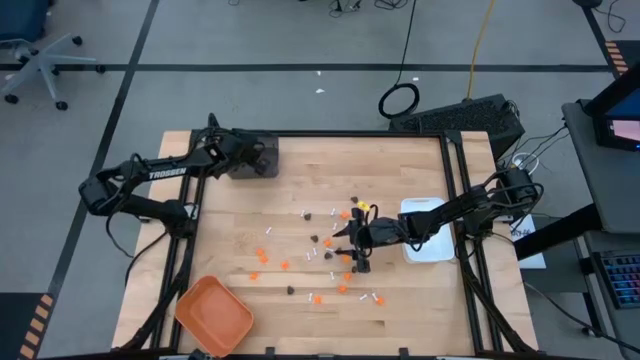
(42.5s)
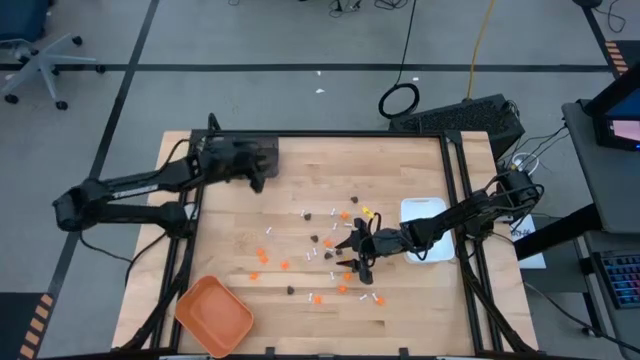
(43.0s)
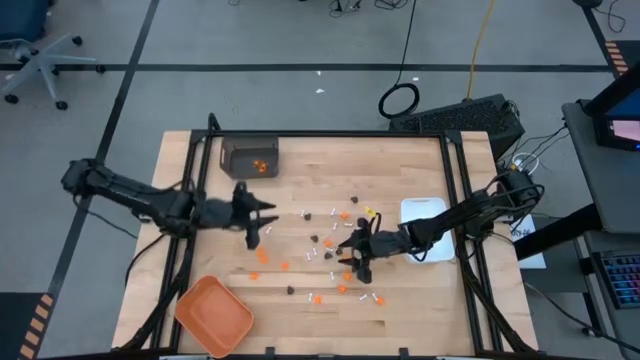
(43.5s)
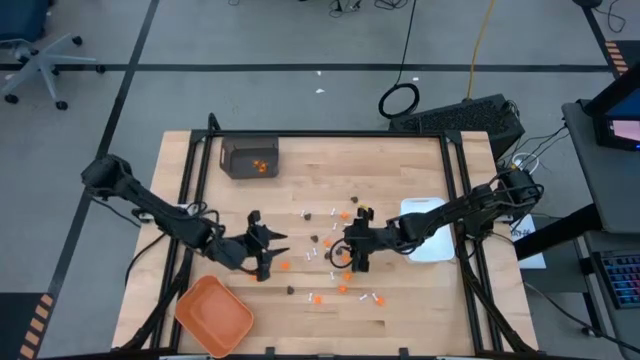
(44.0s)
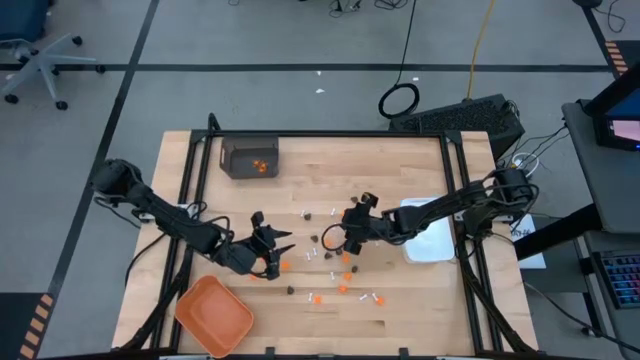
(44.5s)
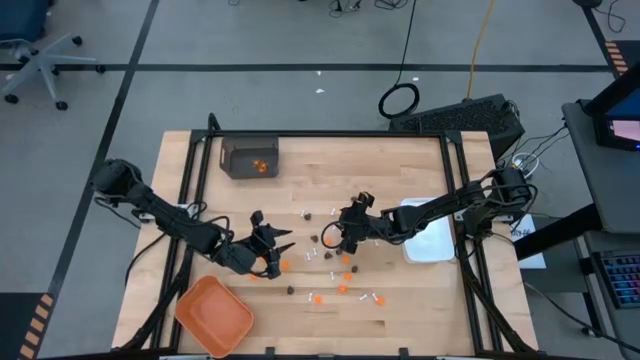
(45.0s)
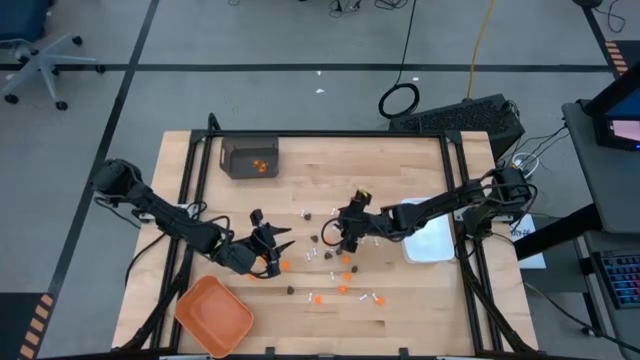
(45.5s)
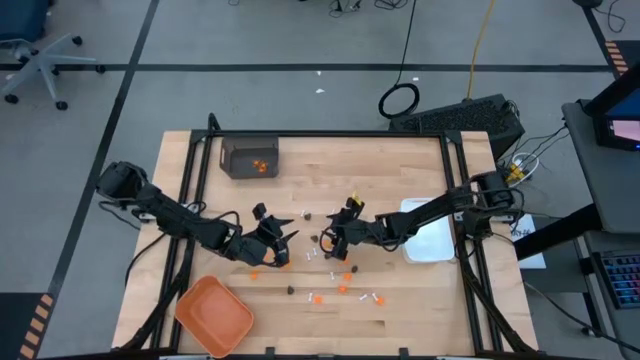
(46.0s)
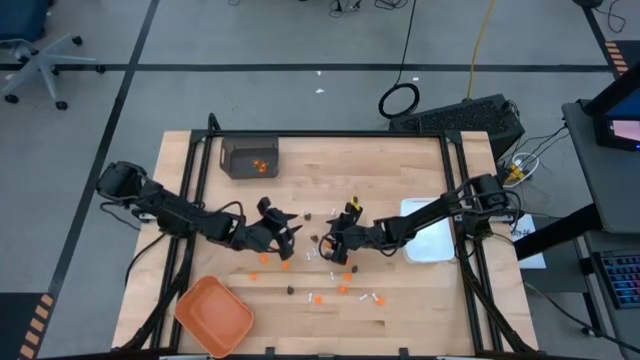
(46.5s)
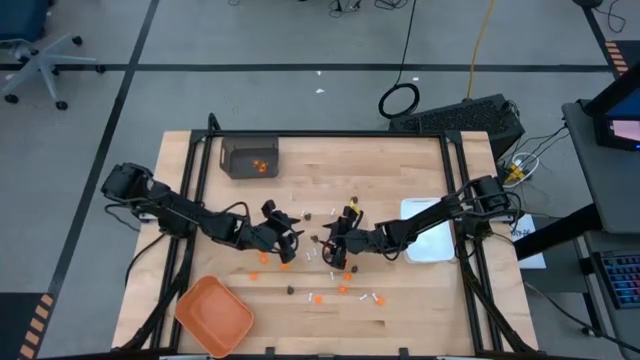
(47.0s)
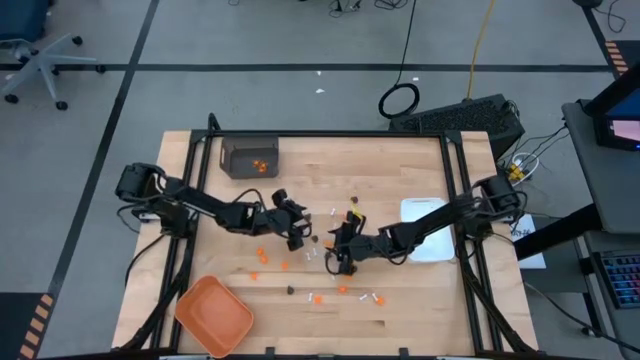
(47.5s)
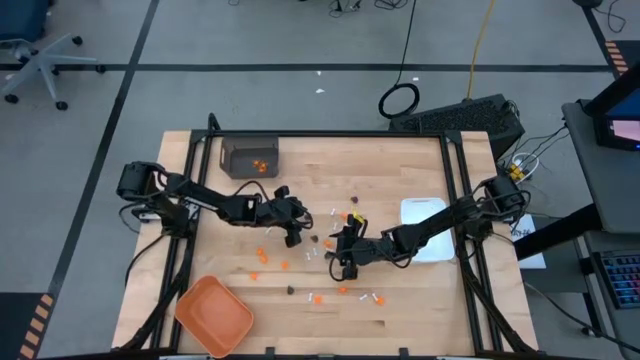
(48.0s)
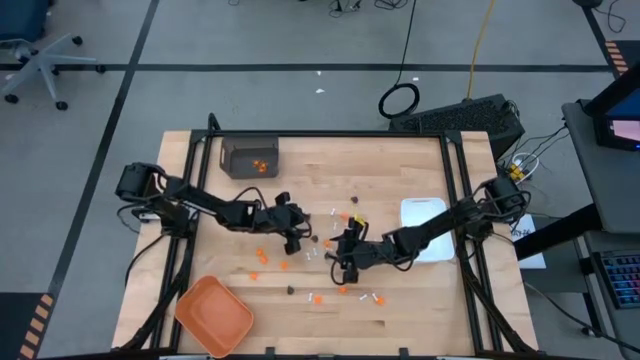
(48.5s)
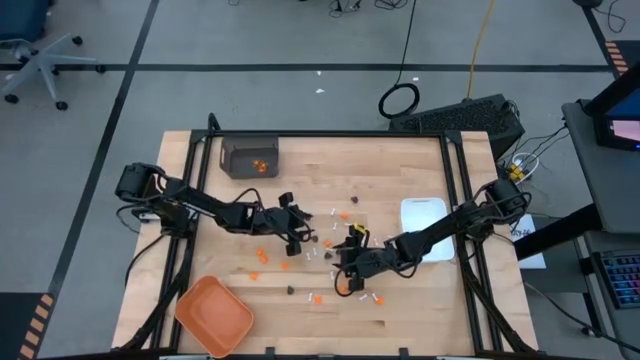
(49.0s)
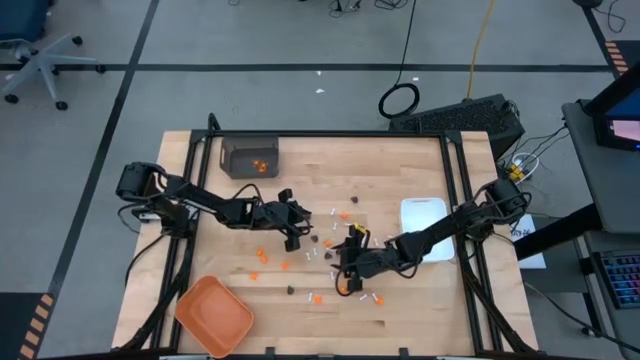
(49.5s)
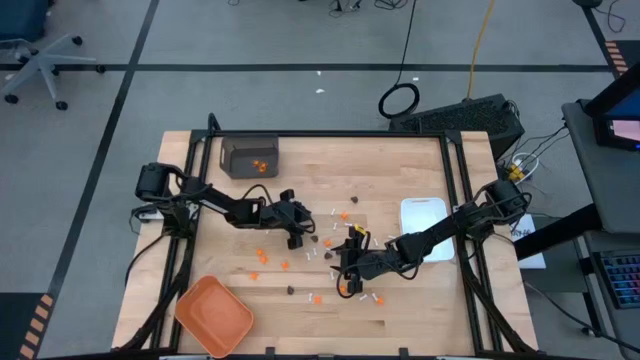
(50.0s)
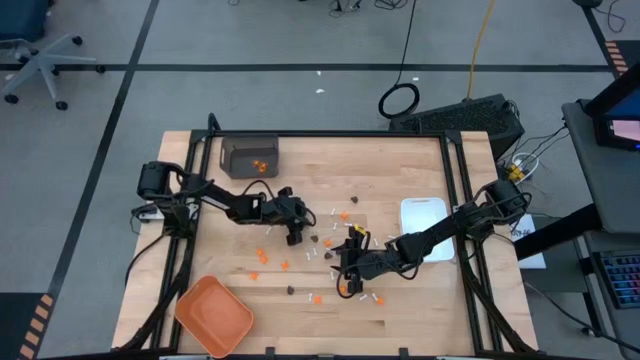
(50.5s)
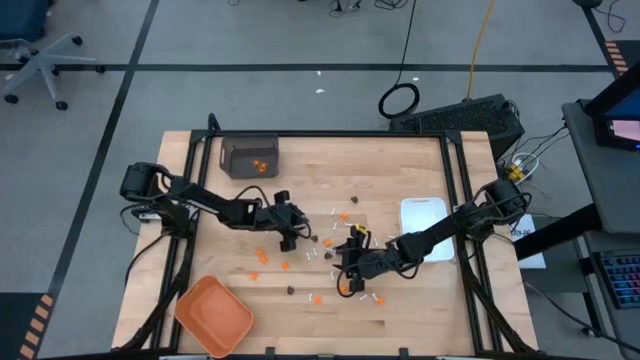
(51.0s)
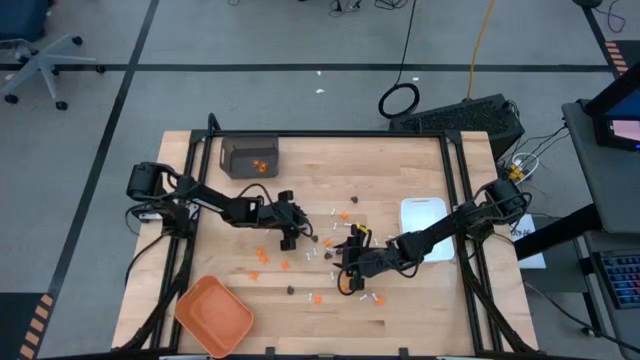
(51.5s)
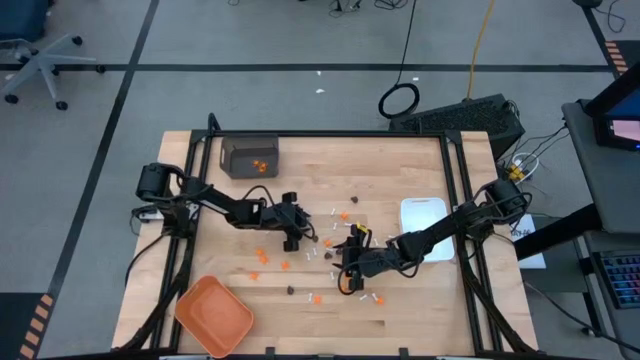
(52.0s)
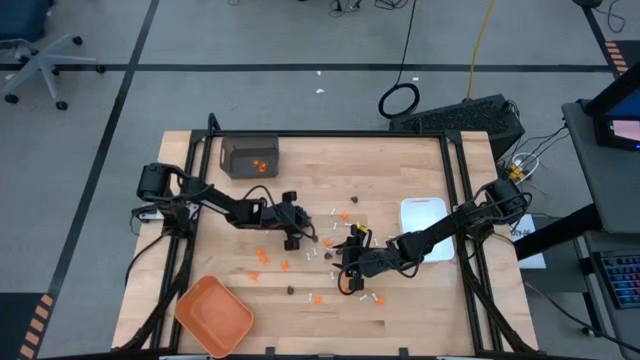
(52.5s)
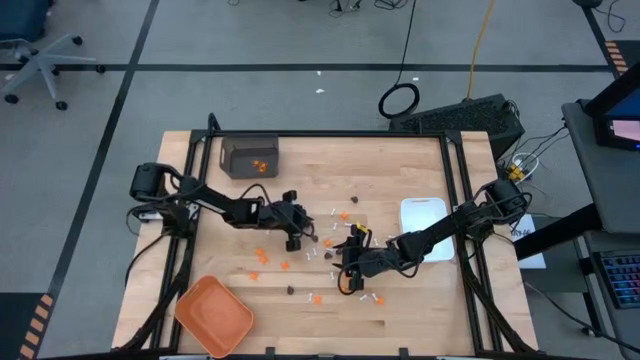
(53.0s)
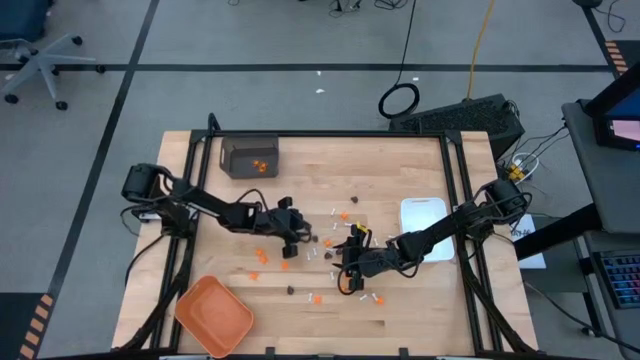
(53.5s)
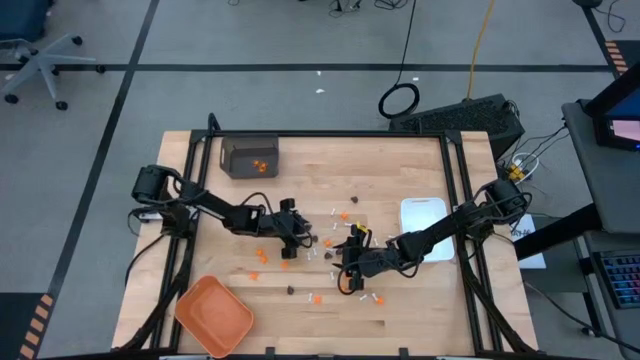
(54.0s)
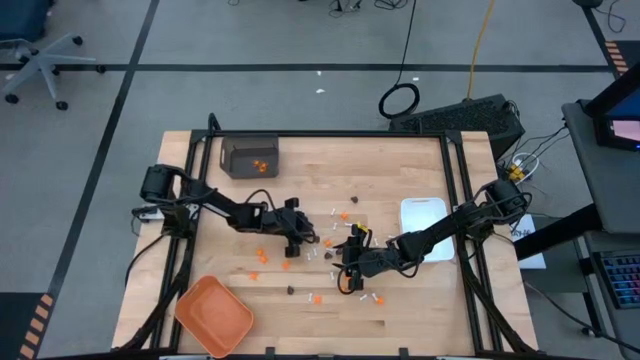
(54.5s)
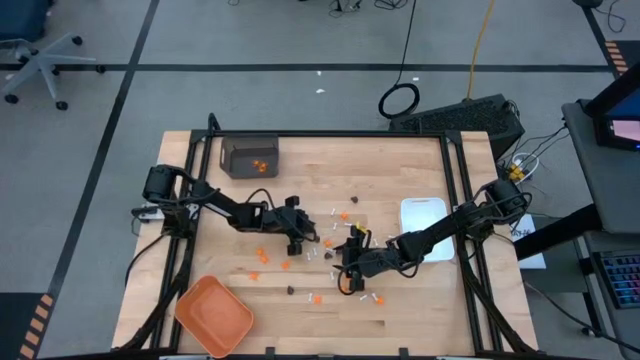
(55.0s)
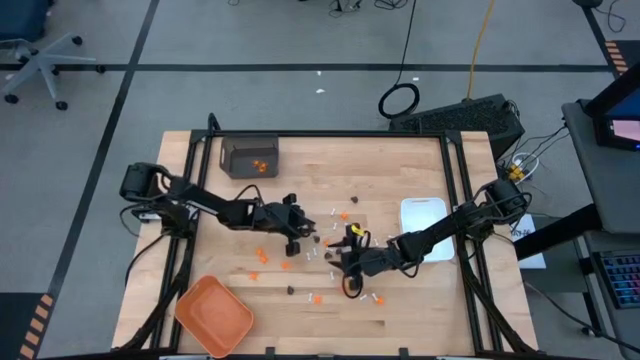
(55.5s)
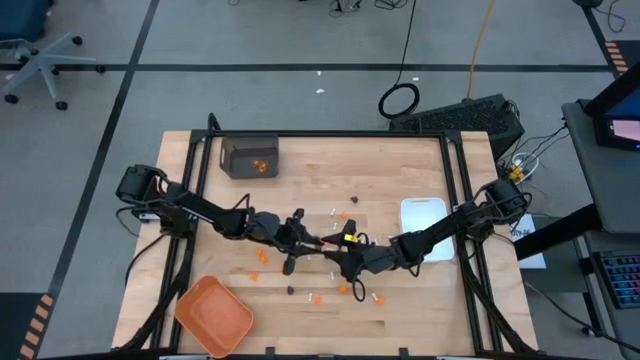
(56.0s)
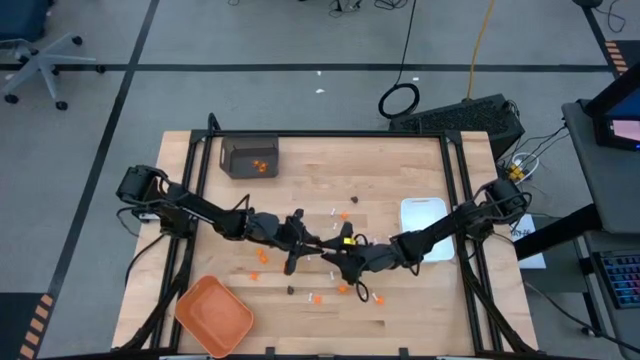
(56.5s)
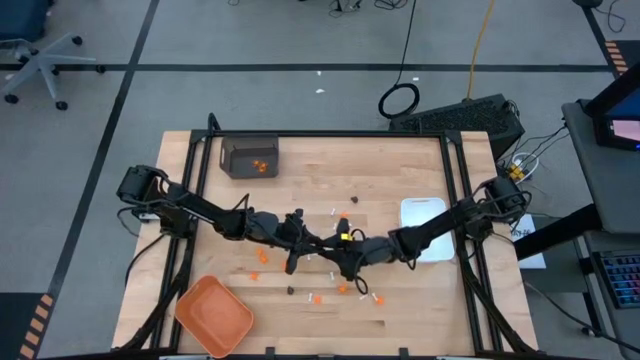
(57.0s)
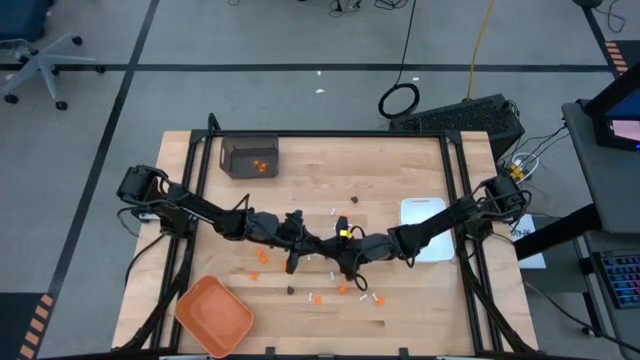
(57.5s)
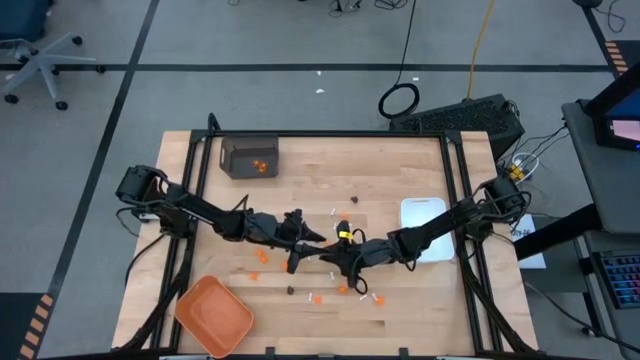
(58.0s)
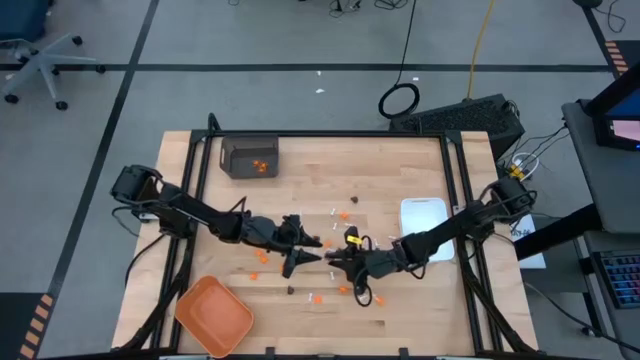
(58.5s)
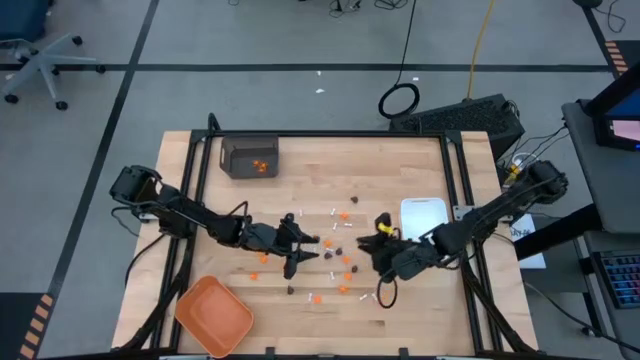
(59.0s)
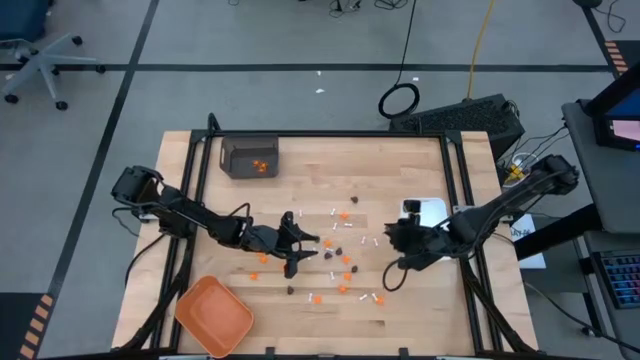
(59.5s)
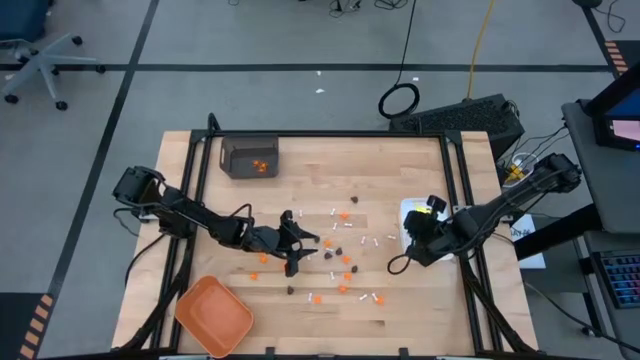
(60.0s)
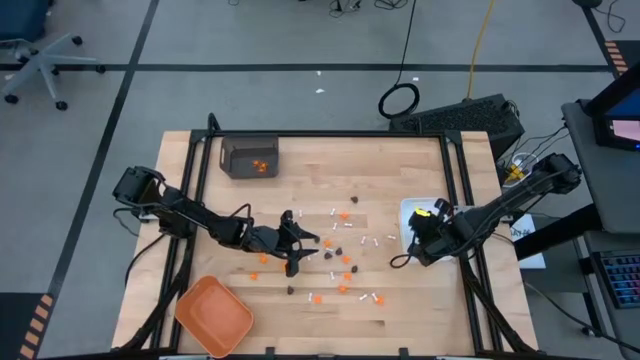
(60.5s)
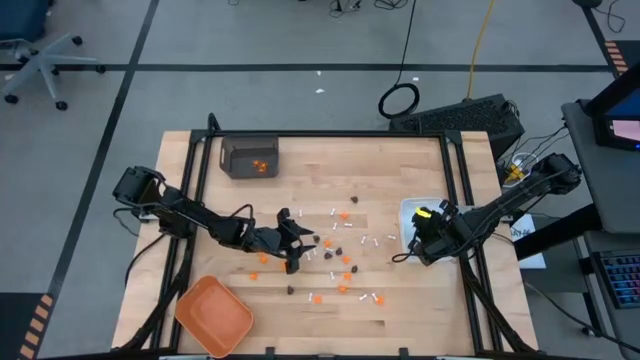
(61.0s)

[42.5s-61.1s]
Task: Sort Halloween decoration
Put the black skull toy into the white bin

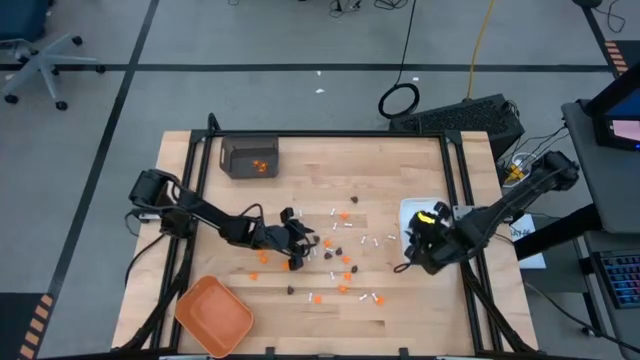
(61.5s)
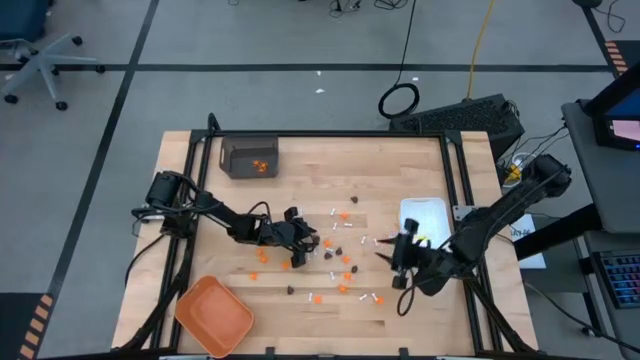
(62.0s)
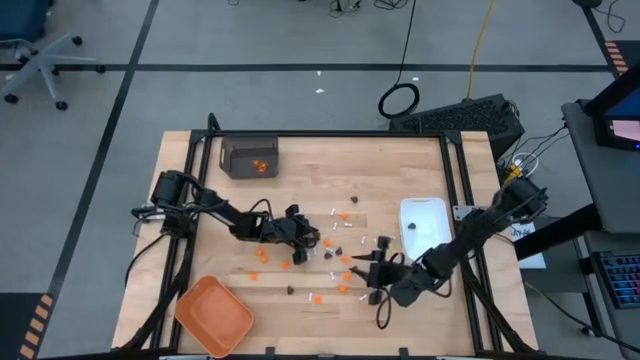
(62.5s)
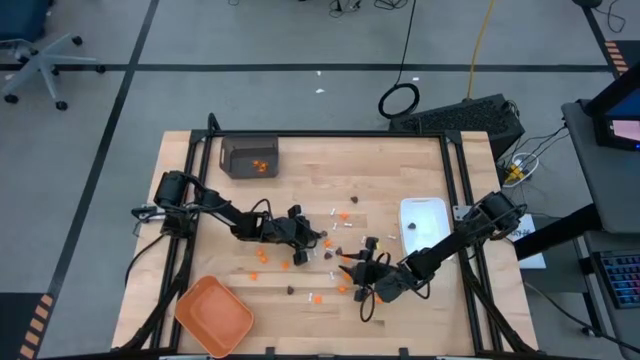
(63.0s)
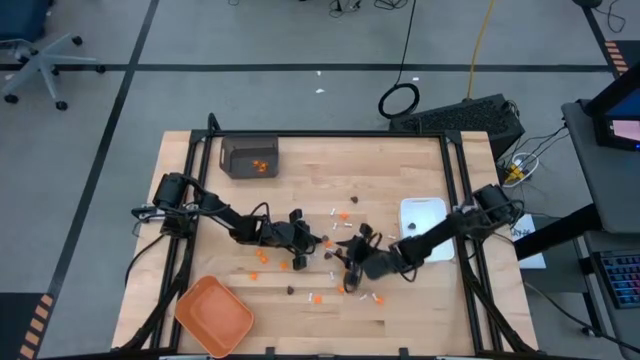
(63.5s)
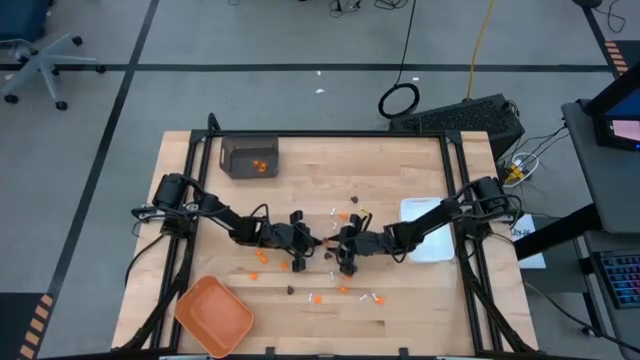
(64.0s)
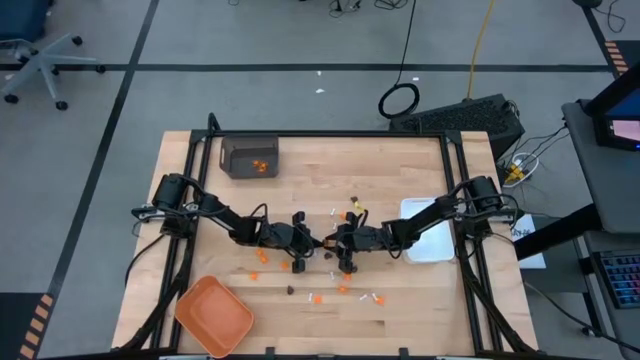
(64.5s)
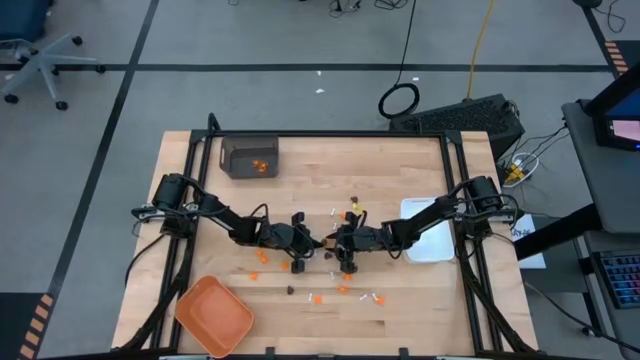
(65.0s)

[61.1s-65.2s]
Put the black skull toy into the white bin
